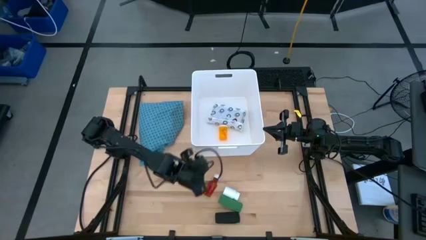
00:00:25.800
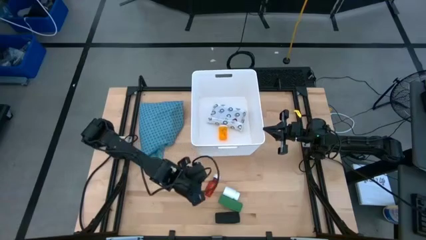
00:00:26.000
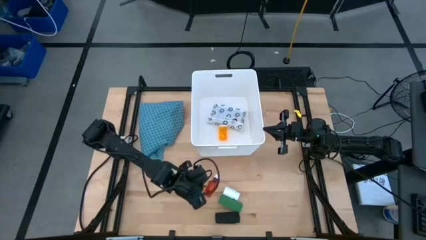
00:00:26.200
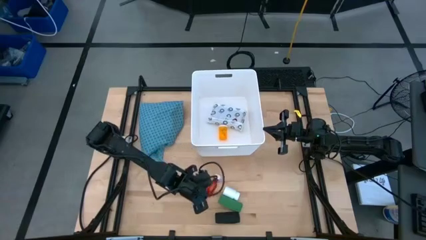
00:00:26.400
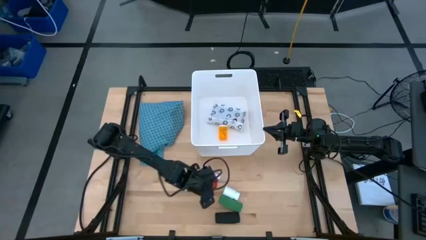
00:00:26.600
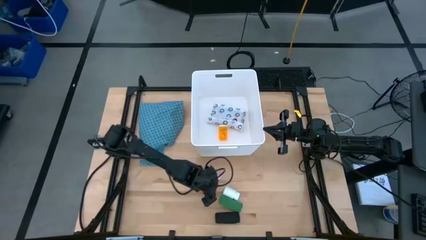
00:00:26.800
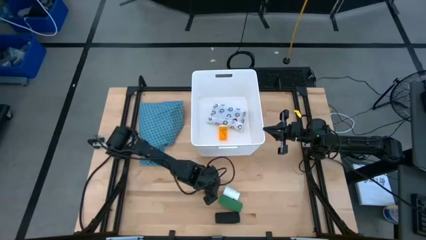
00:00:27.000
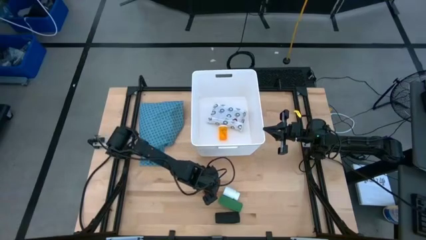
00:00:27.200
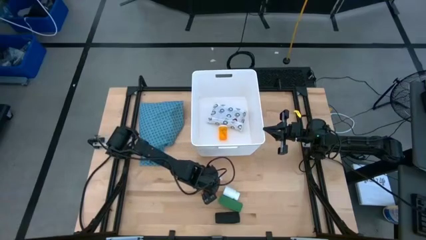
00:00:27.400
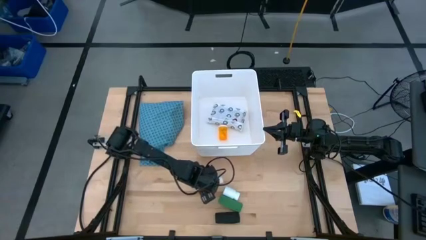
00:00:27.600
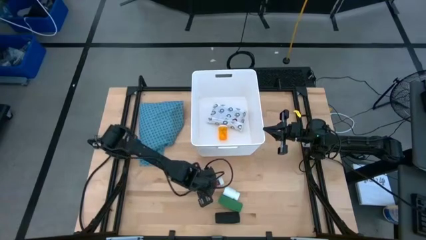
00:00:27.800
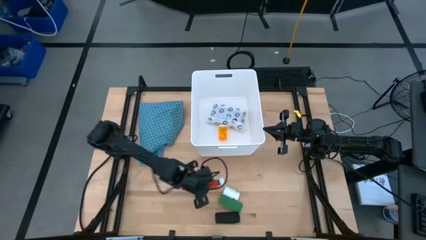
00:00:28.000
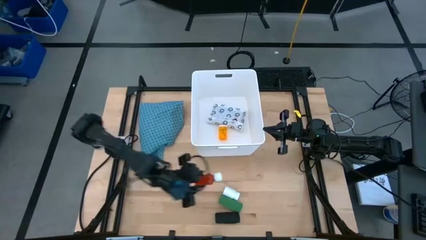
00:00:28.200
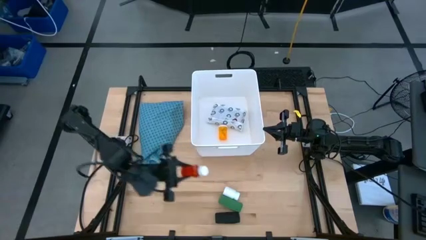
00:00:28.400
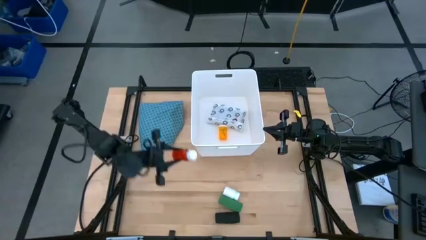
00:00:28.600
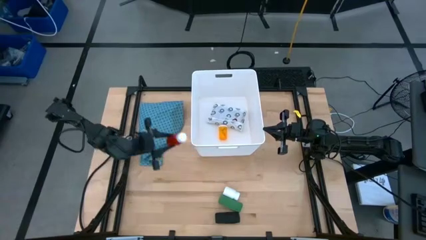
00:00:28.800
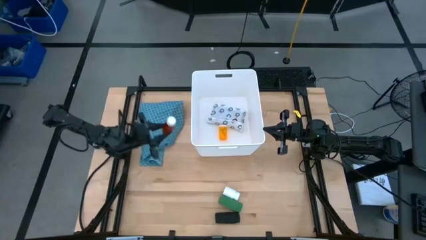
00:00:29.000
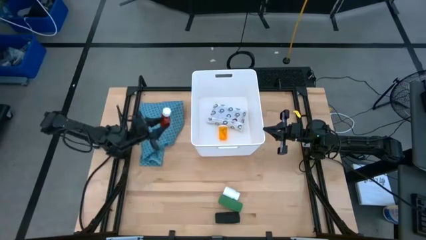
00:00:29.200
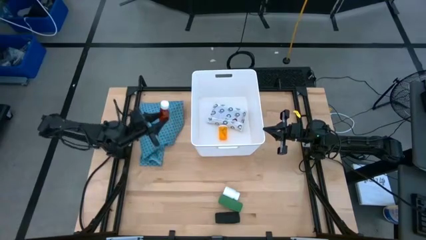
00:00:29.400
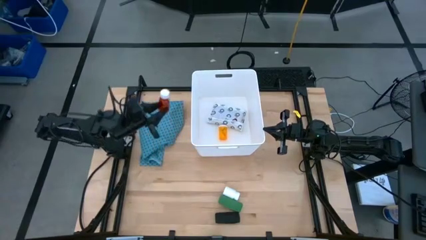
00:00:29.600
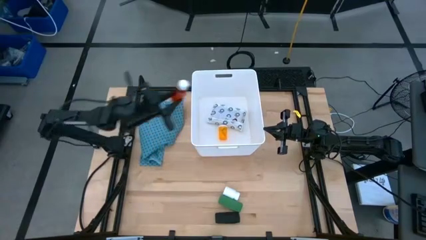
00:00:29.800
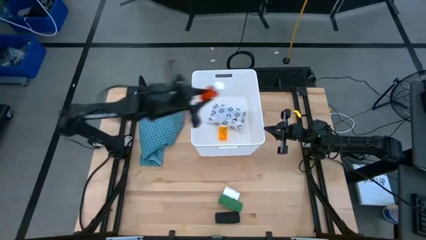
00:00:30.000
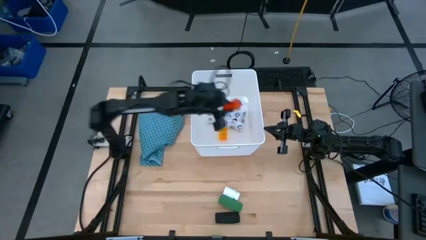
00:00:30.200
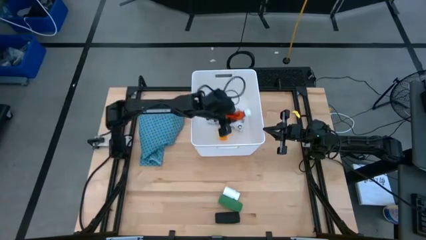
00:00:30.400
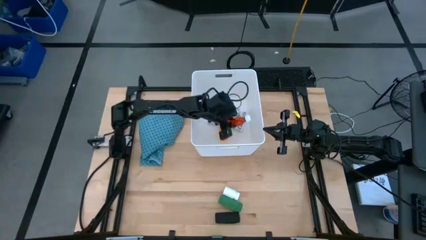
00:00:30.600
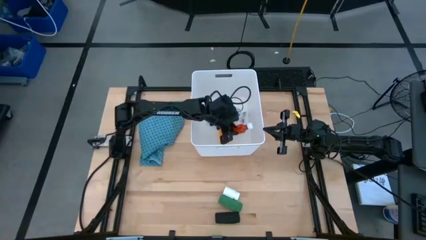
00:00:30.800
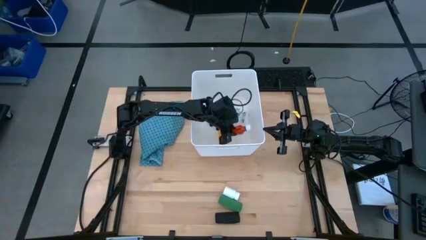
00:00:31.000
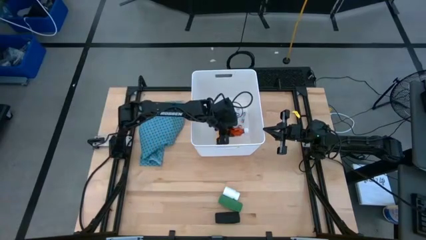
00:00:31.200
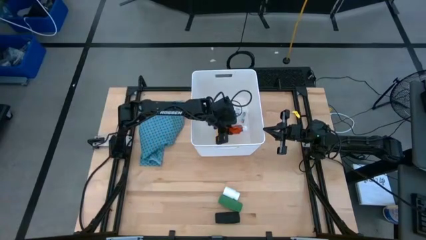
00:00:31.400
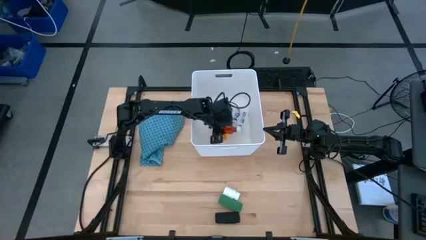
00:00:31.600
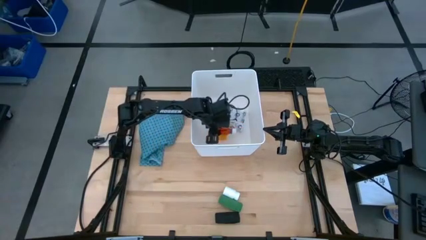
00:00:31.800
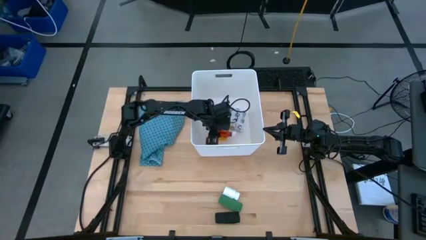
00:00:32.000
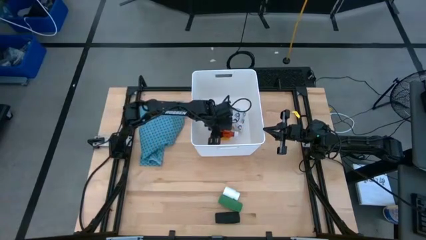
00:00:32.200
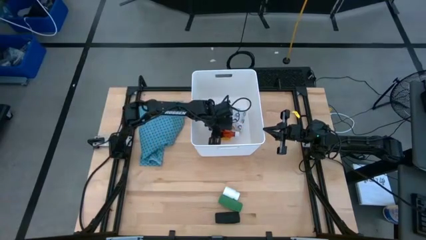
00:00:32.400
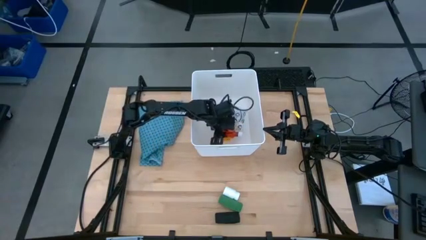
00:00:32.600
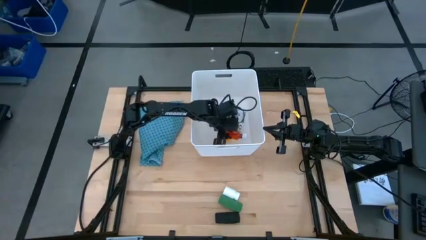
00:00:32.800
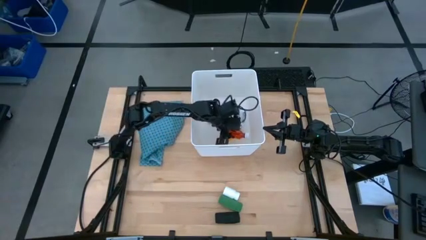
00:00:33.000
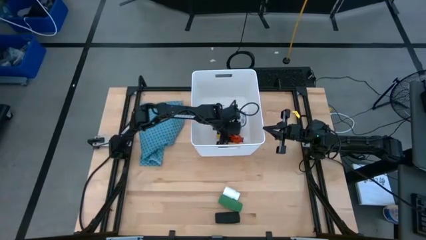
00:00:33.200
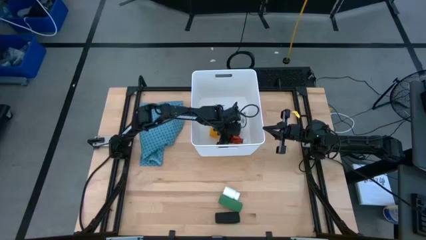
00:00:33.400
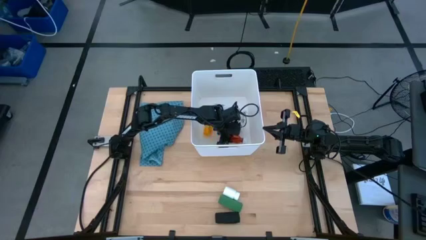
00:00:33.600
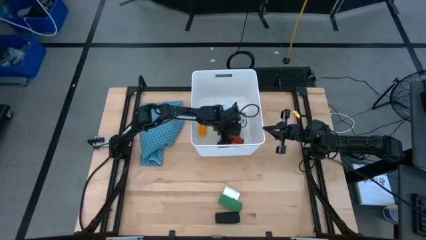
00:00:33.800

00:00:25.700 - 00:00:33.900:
Task: Pick & place medical supplies in basket/bin
Put the red pill bottle in the white bin

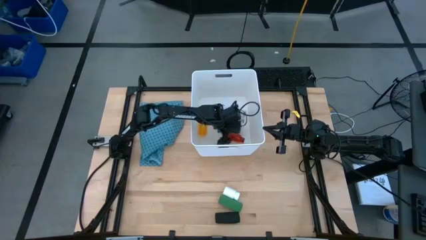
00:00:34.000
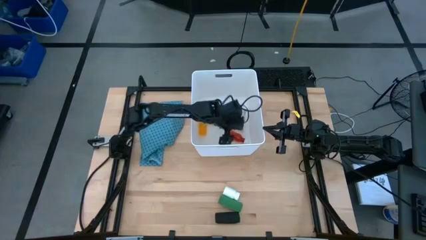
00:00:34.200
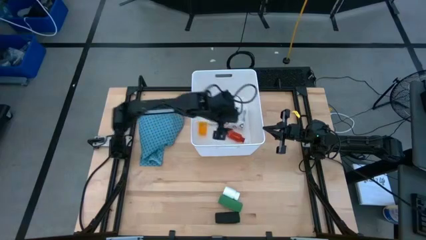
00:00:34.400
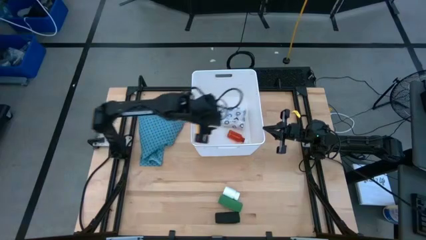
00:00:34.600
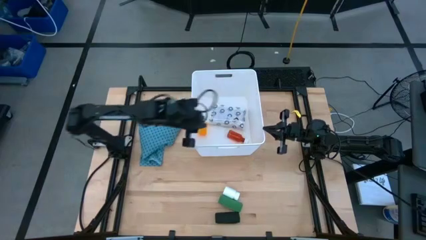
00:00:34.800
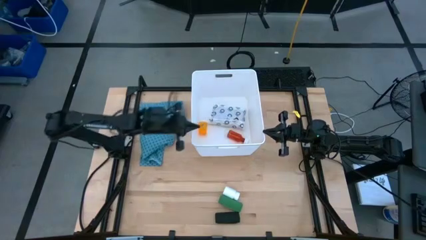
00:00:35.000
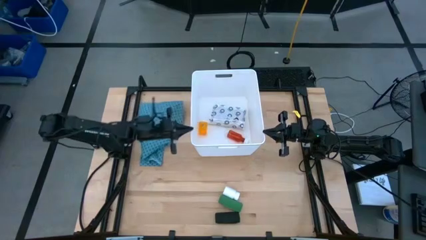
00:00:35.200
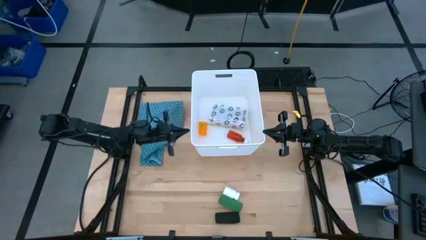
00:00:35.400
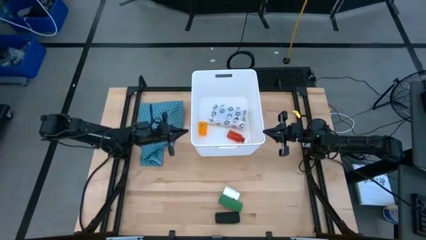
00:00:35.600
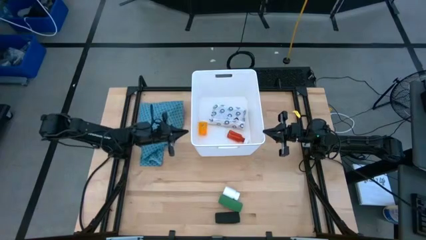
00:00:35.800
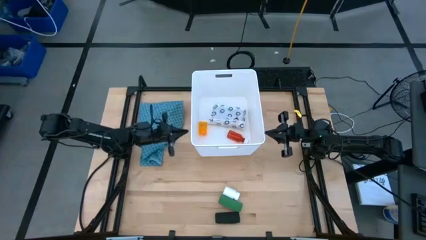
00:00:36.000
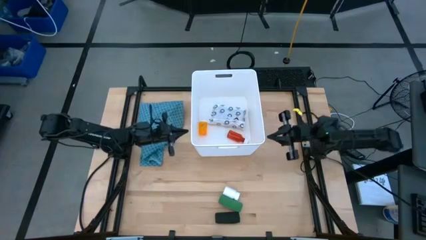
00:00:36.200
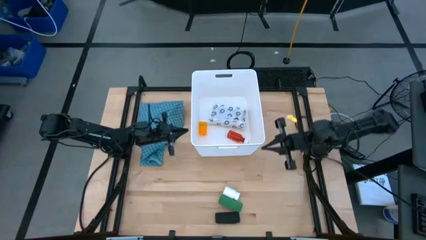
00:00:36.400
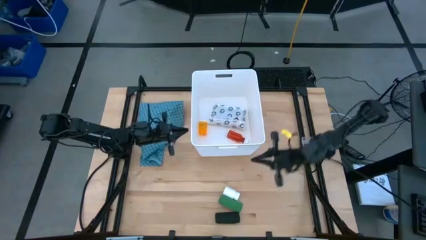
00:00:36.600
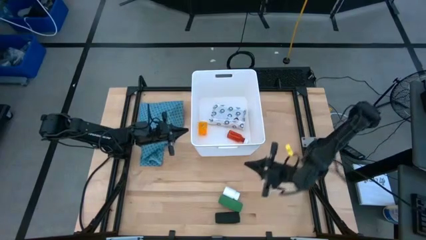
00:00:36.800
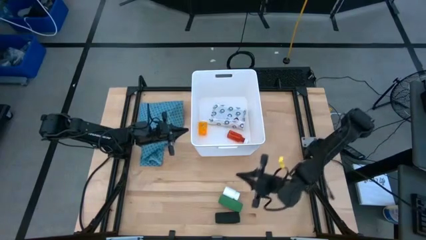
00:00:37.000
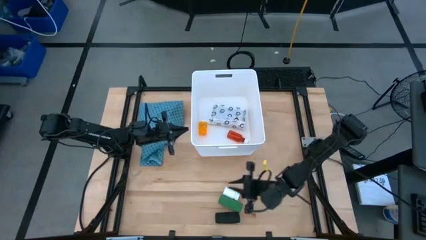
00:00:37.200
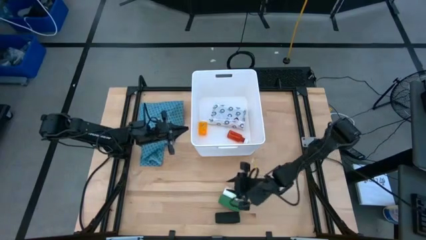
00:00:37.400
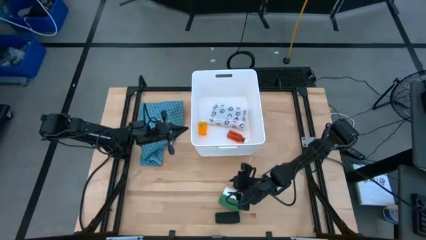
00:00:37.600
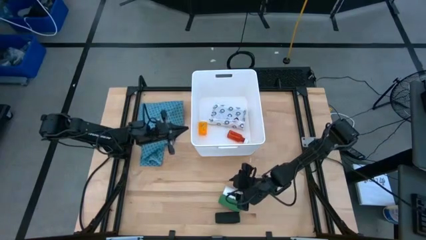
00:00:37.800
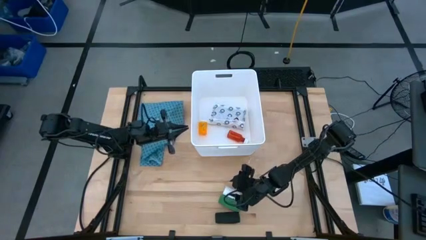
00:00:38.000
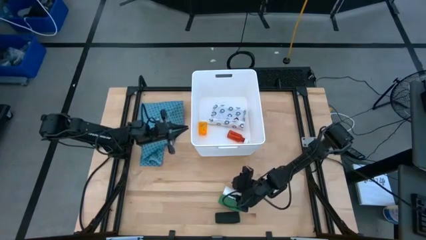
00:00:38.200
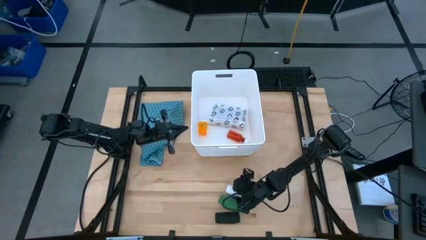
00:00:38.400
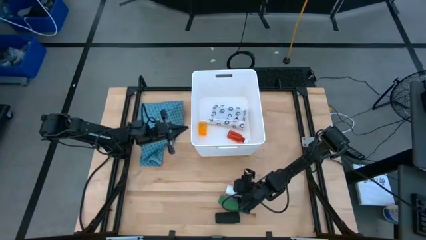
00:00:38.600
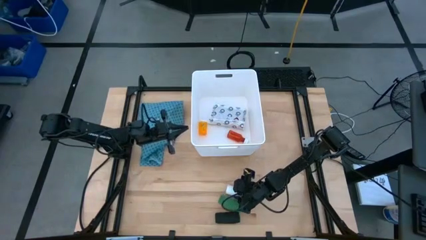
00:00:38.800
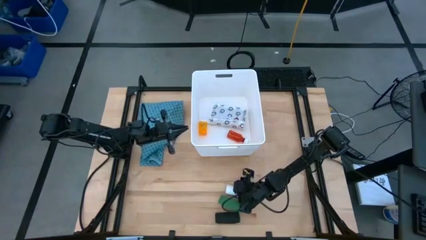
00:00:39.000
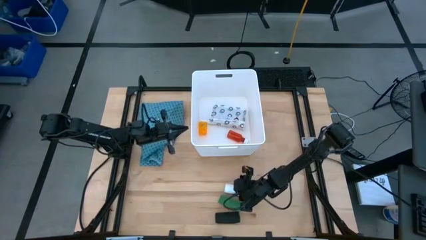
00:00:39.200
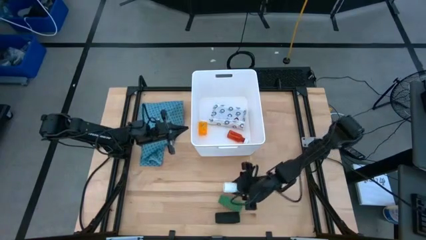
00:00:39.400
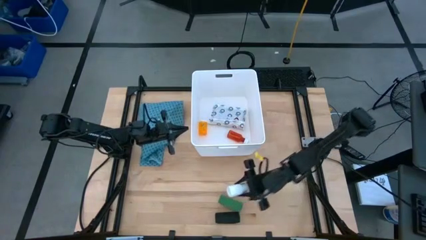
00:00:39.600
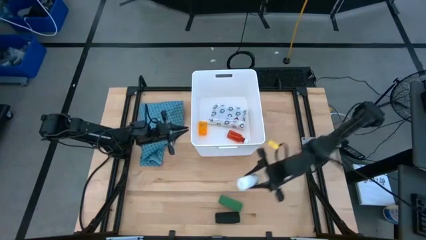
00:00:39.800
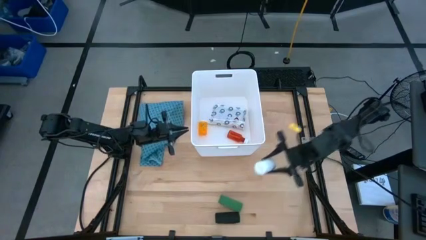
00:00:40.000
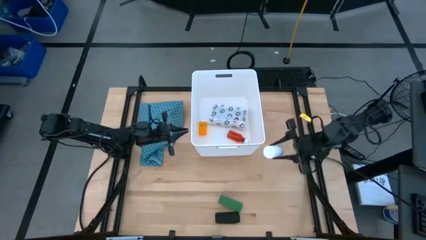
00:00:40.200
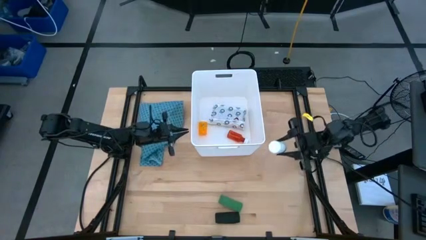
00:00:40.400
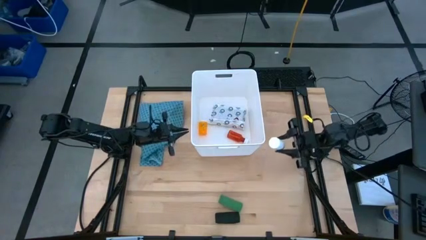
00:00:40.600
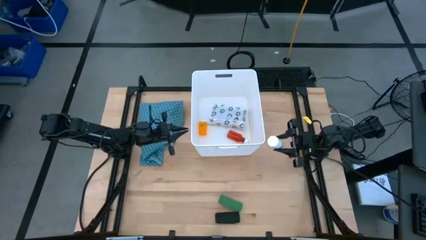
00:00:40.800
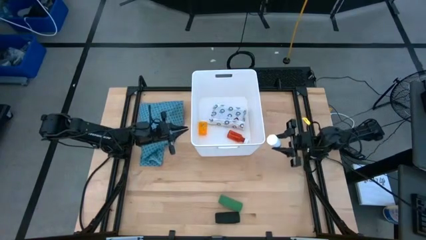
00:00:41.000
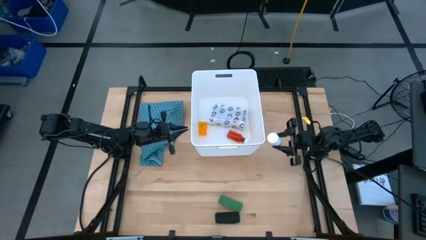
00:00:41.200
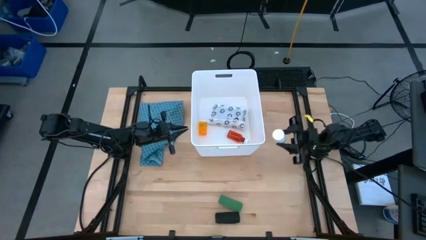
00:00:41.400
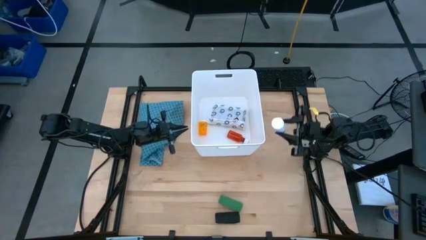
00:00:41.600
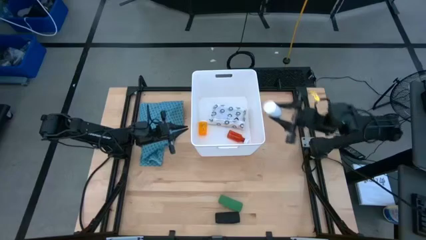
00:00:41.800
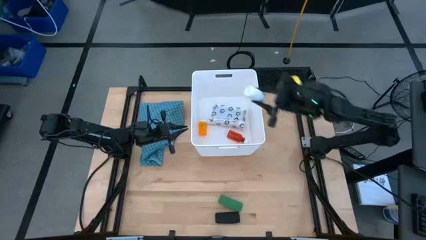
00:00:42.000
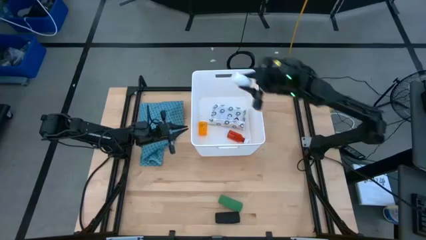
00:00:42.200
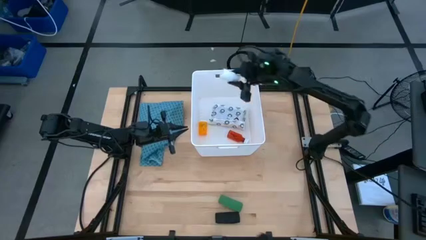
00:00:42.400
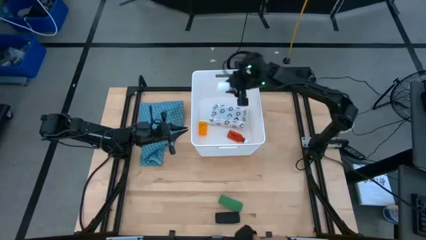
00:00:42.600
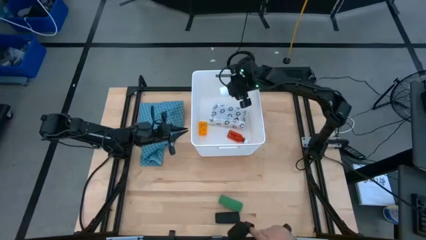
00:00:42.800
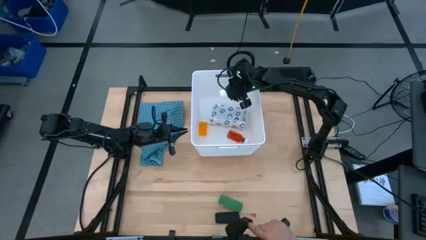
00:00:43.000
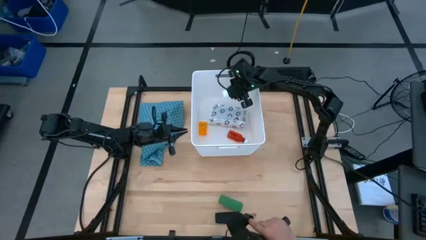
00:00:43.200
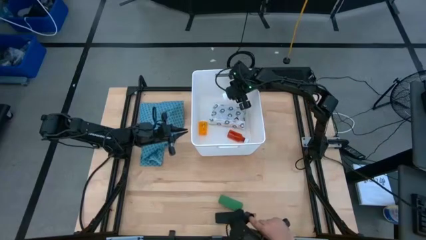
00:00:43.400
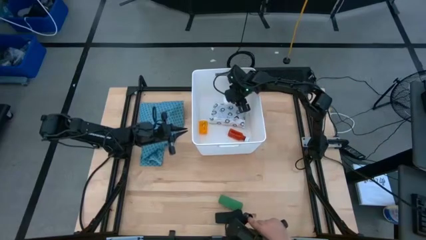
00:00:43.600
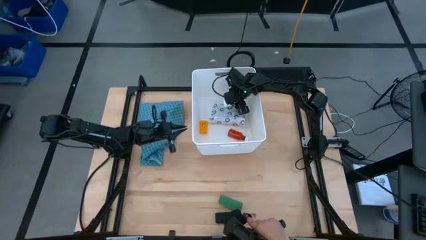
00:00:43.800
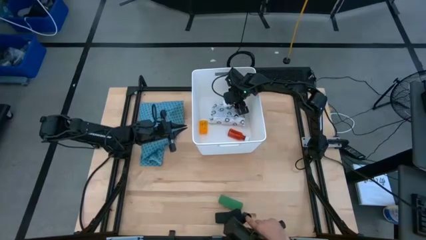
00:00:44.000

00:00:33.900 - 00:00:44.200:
Put the white pill bottle in the white bin
